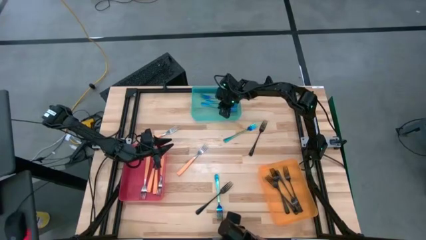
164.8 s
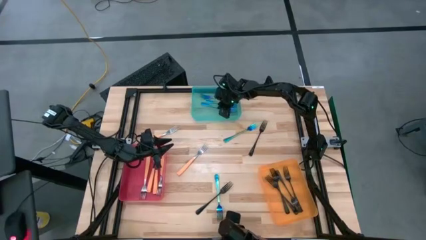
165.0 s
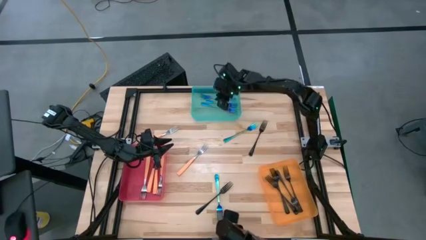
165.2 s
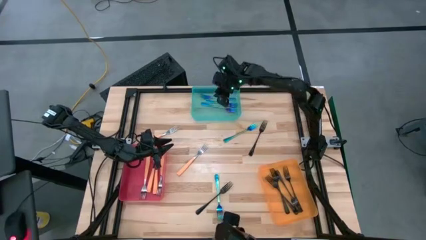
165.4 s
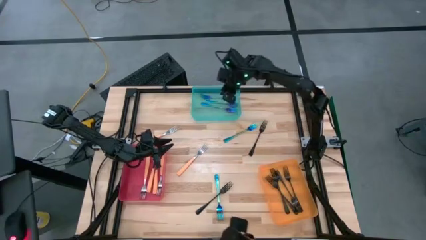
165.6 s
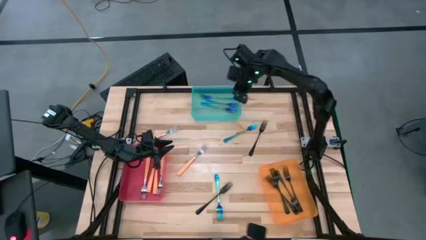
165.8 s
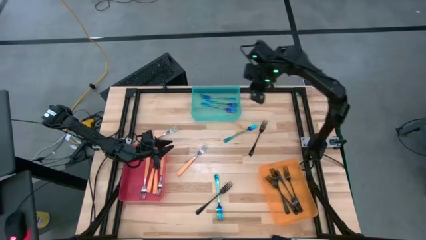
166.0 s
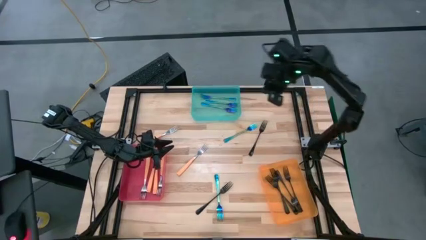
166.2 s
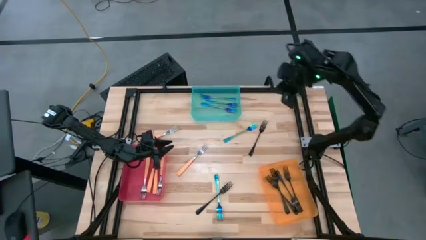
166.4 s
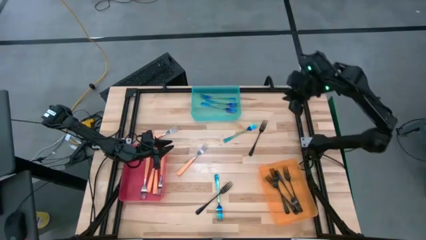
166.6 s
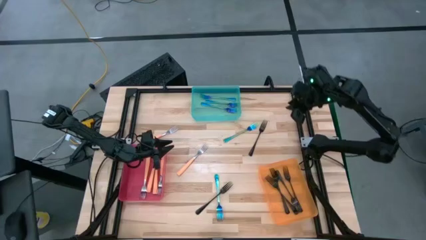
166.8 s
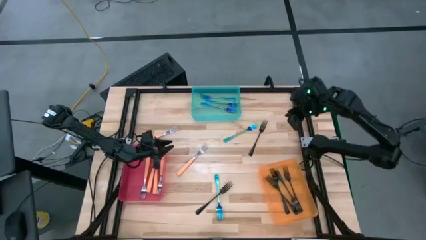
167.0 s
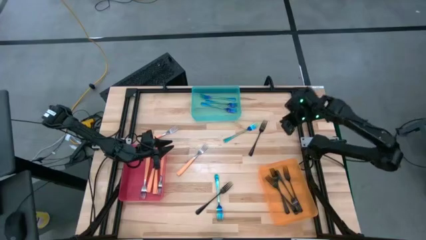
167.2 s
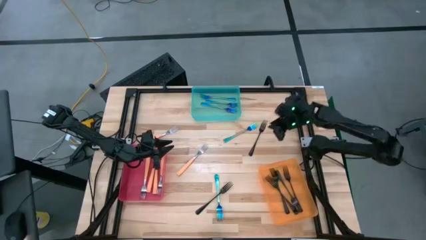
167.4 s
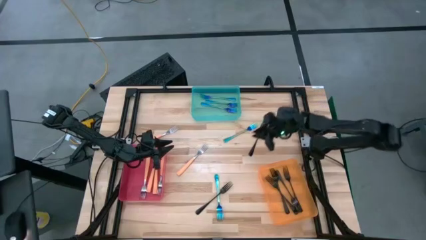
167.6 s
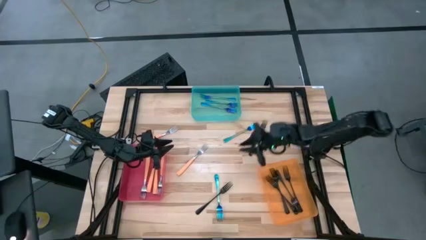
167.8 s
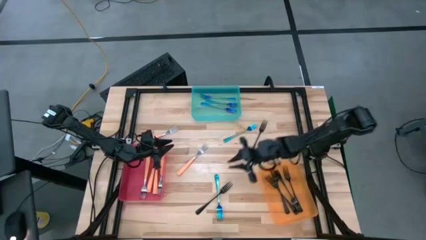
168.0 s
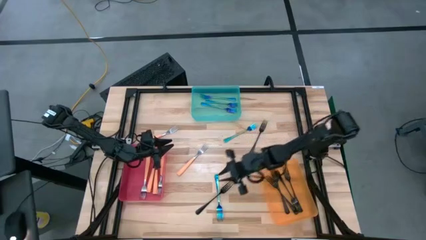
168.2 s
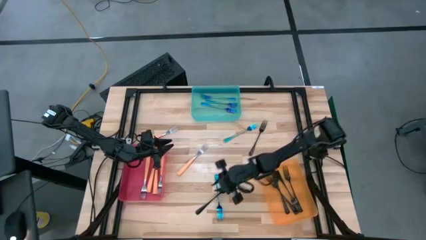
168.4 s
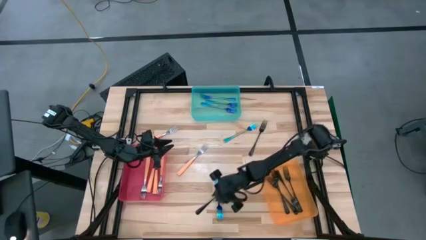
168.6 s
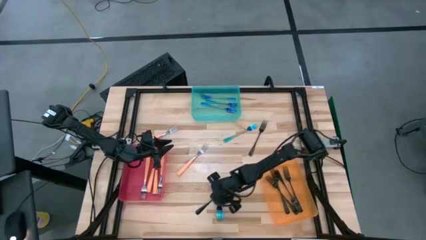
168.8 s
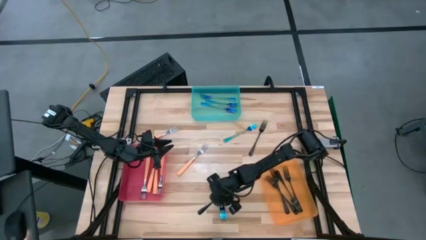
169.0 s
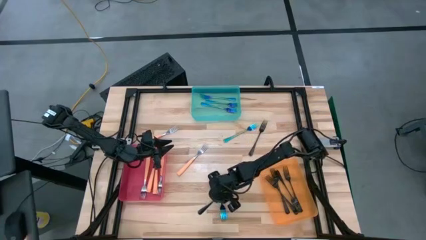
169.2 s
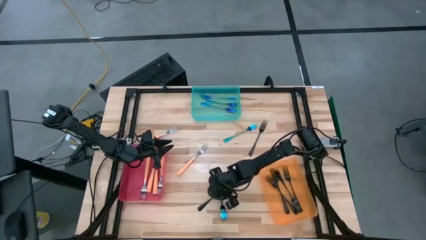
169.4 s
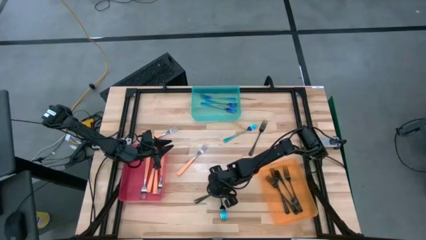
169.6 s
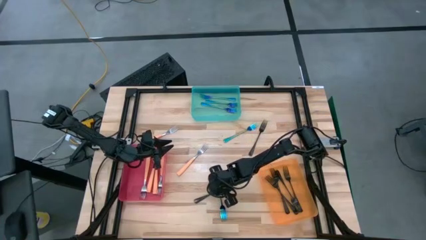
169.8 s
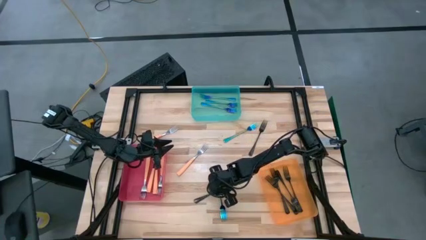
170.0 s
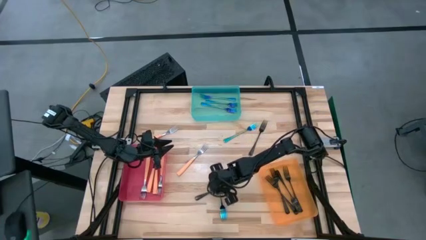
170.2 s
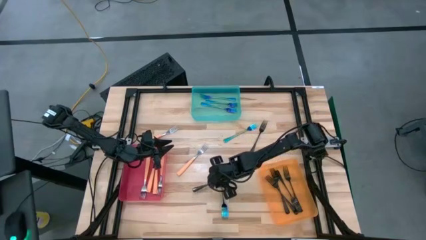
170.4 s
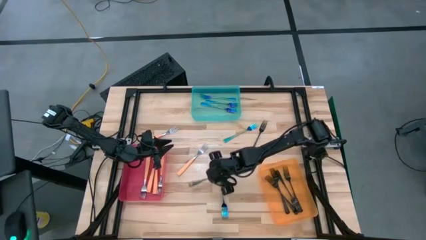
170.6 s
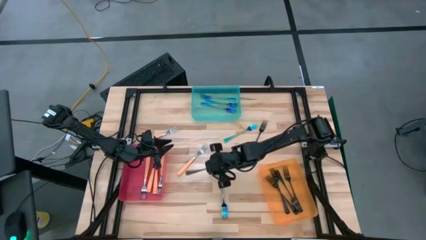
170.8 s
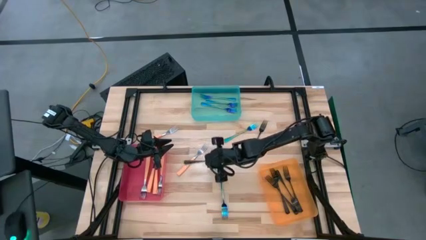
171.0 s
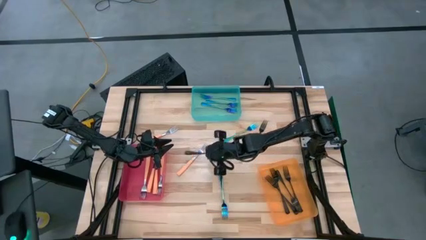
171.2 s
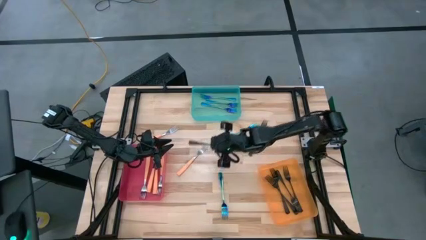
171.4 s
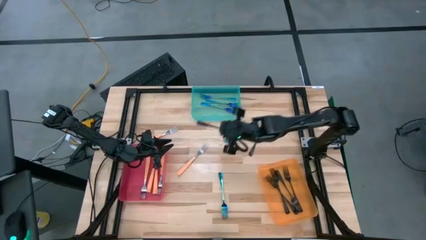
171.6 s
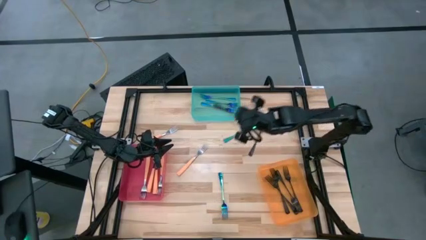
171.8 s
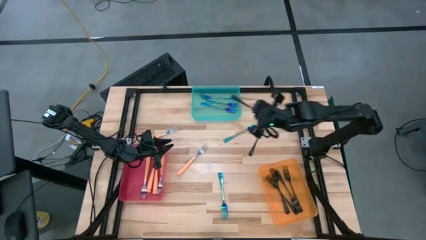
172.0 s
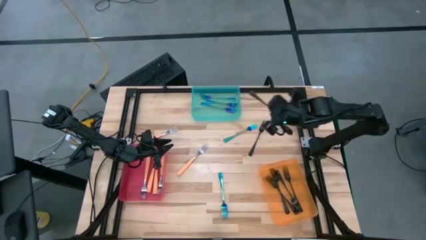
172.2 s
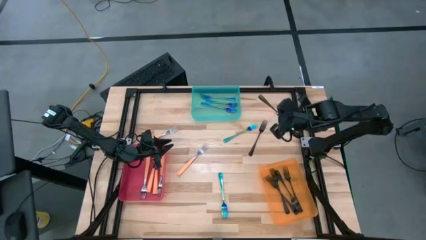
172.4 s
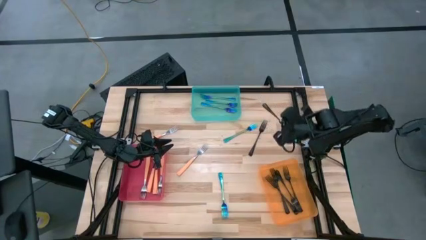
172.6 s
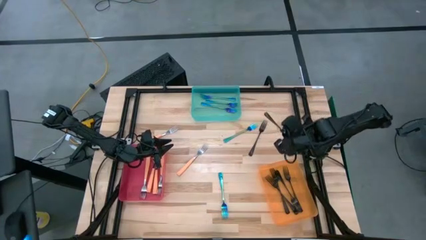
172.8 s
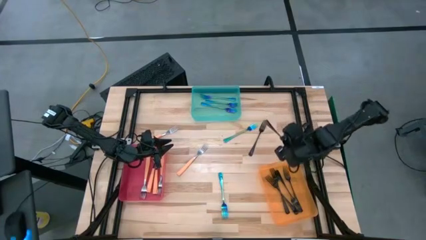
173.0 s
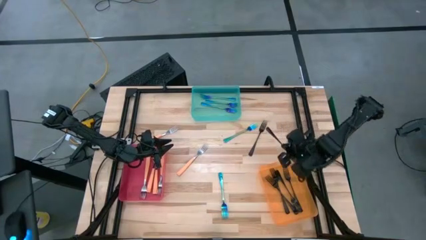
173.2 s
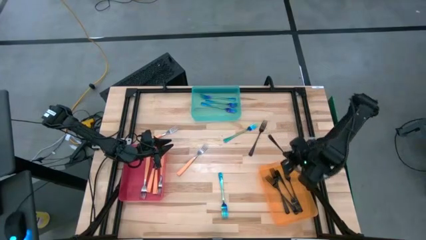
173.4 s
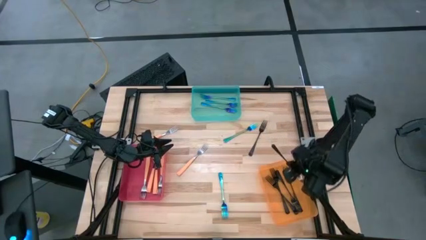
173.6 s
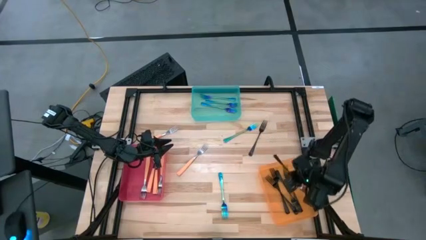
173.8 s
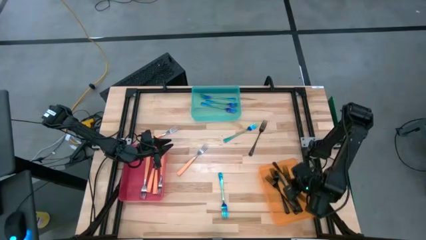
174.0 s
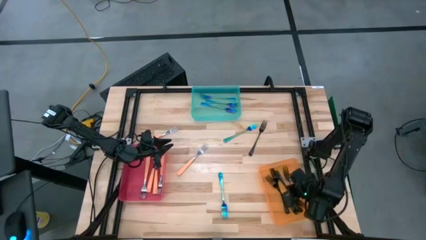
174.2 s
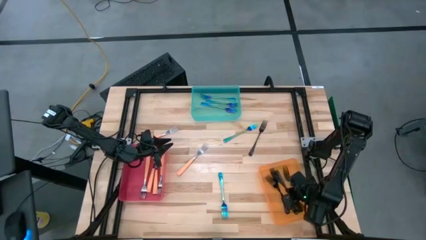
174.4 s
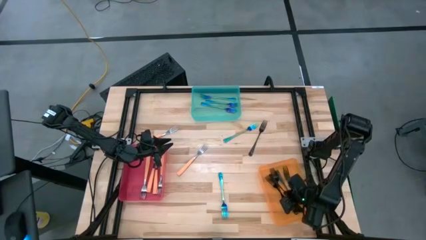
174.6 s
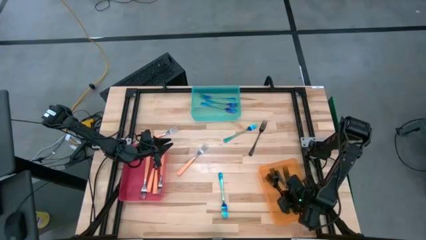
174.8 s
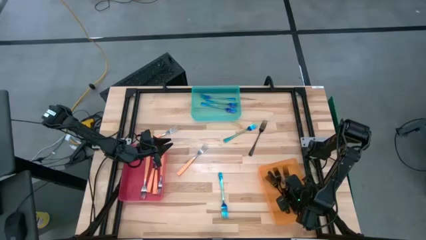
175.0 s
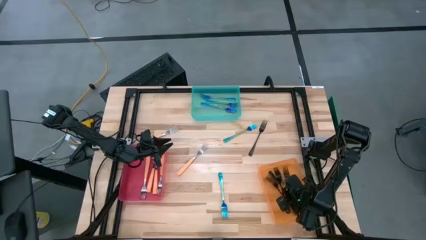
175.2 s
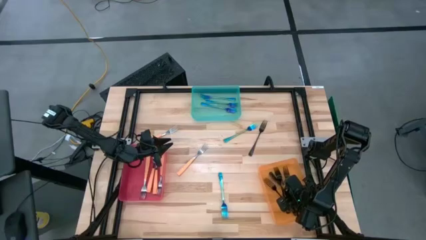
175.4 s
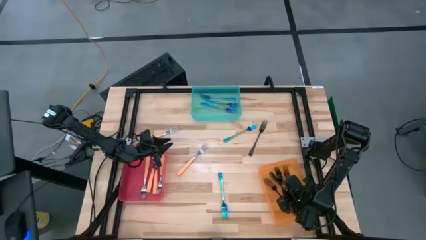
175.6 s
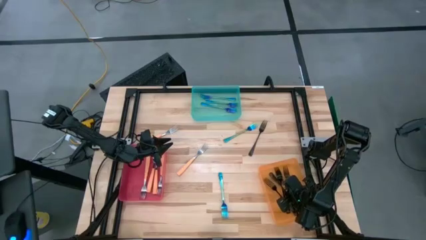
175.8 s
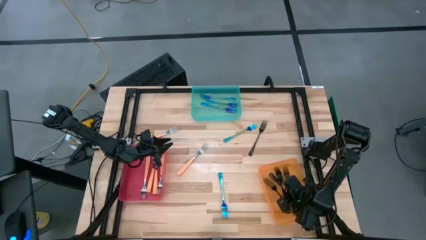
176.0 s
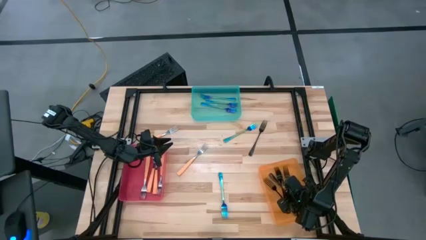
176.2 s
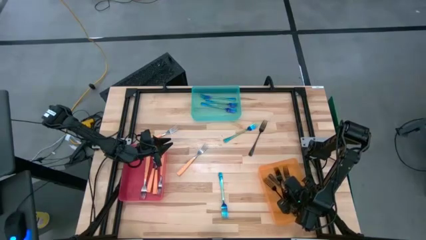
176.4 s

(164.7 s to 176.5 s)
Task: Sort silverware by color (type)
Put the black fork into the orange bin

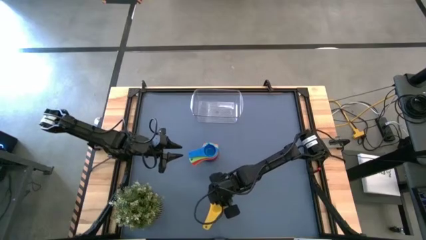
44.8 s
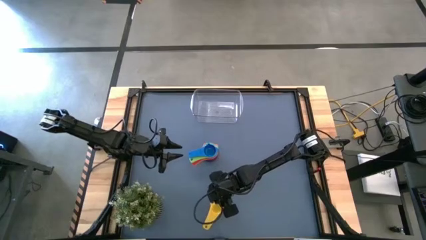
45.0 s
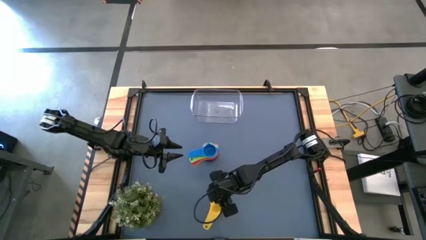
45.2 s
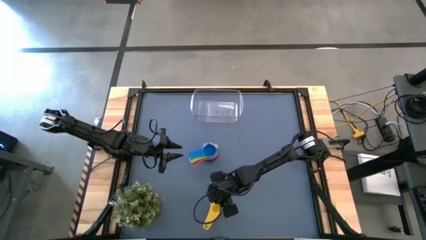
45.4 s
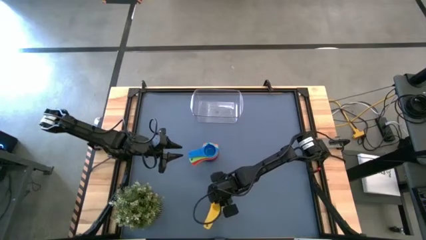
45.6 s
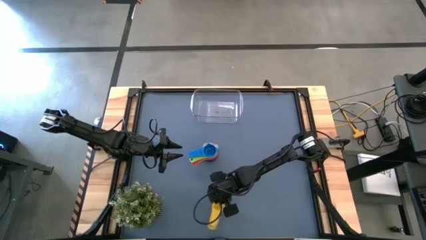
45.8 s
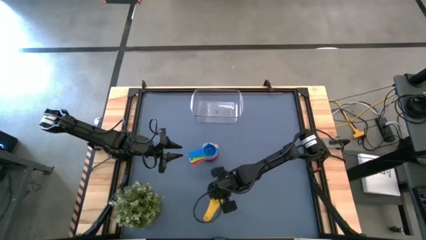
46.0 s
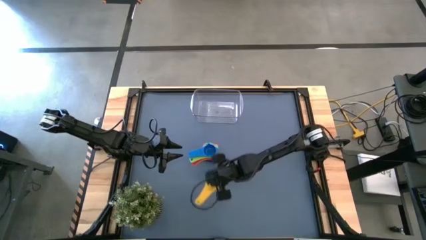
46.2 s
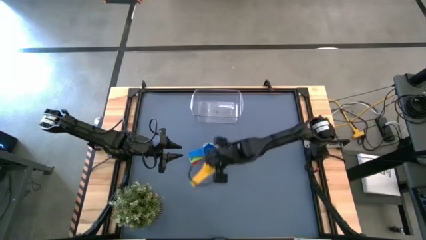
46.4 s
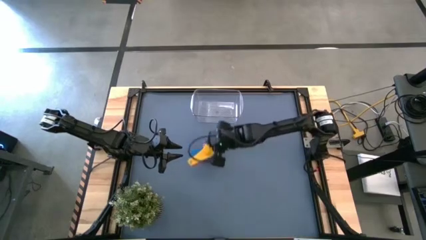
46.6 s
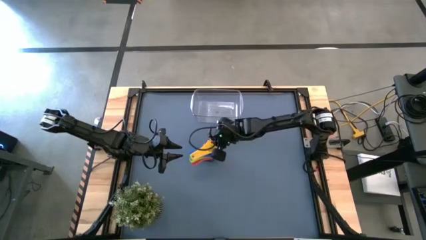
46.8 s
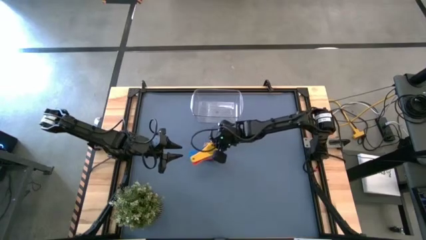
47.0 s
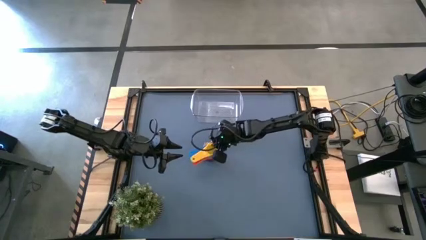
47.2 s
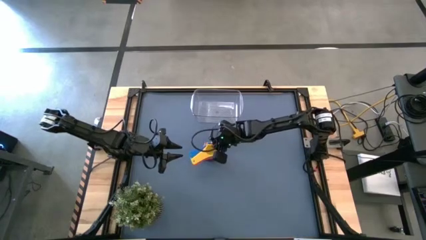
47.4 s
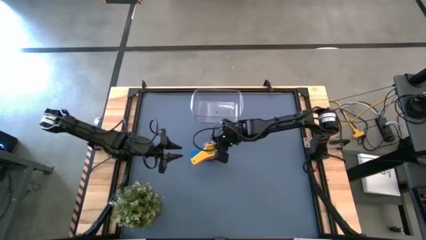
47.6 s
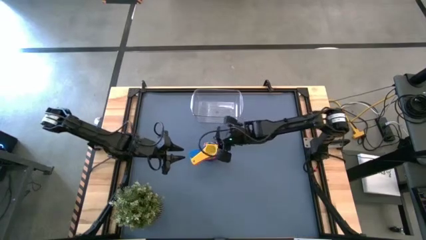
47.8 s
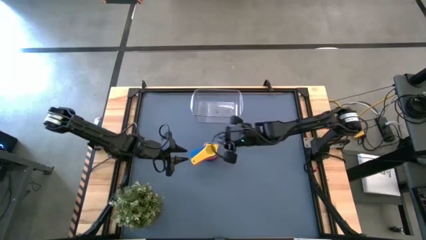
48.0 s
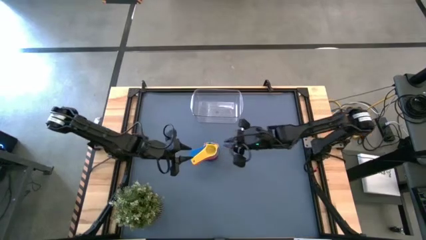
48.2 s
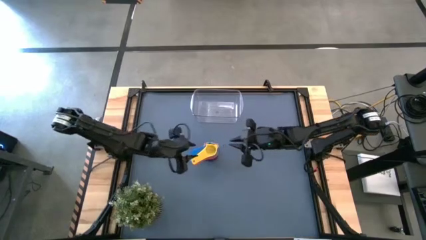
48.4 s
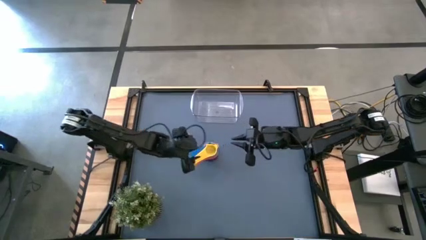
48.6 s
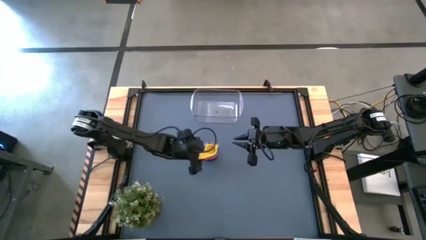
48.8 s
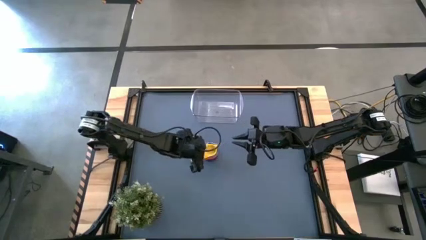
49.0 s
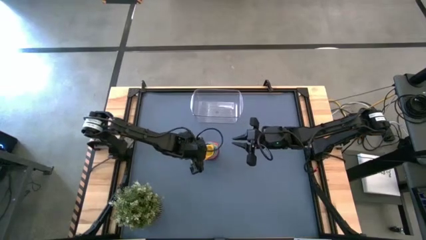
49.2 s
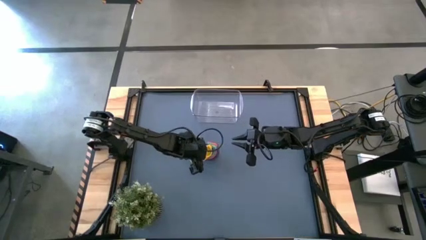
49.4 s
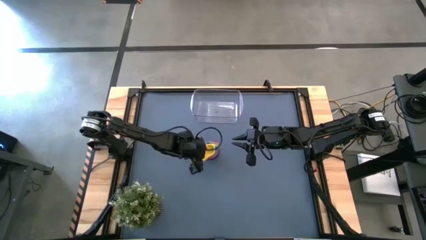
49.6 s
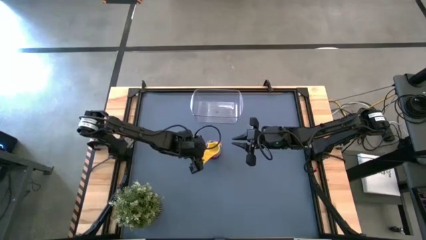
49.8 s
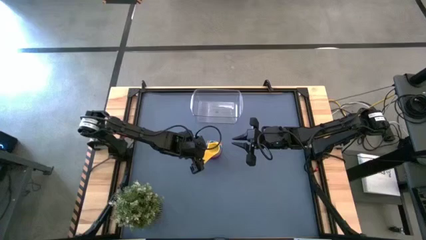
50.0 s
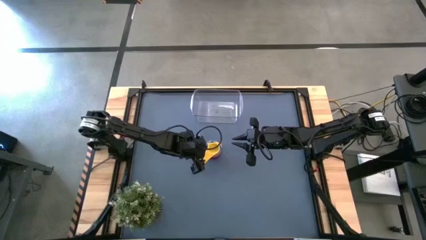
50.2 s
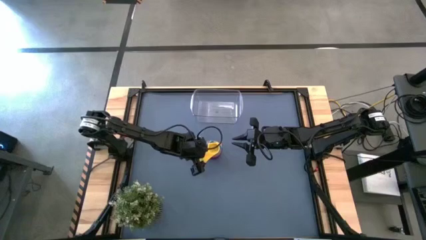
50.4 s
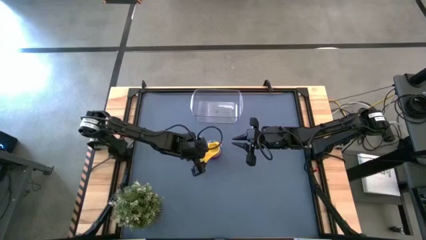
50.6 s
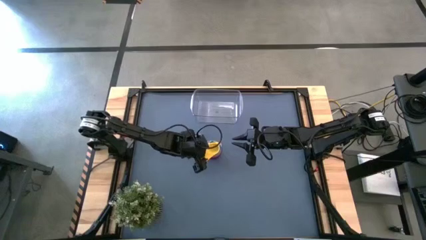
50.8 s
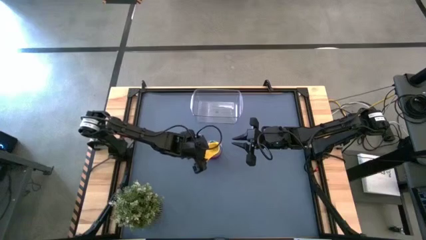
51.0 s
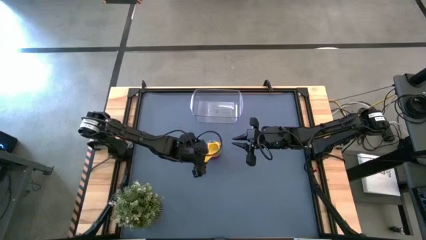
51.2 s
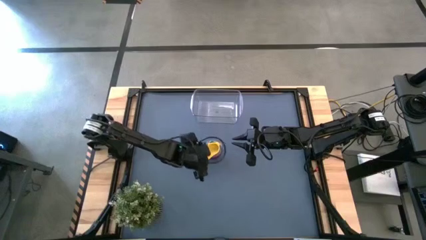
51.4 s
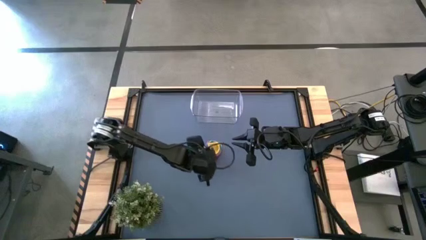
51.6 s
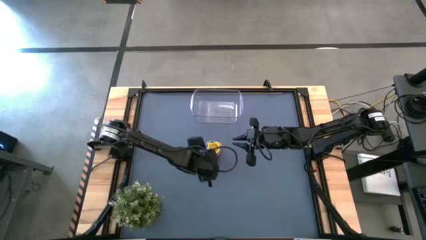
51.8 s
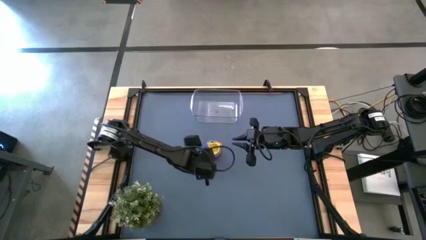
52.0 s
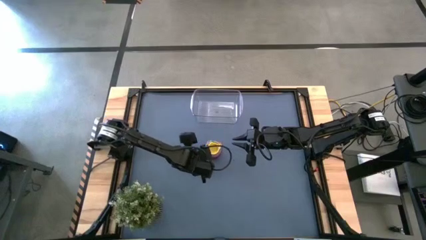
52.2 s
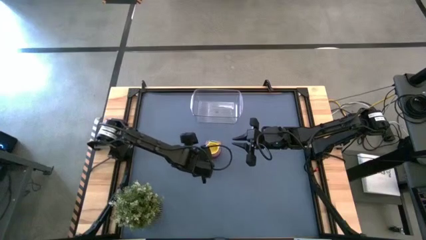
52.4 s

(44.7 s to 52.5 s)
Task: Nest measuring cups in basket
Stack the yellow measuring cup on top of the blue measuring cup
